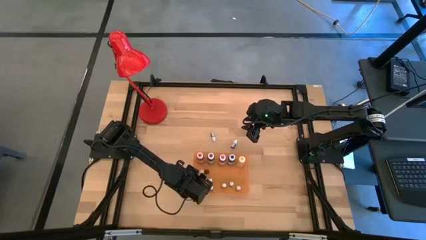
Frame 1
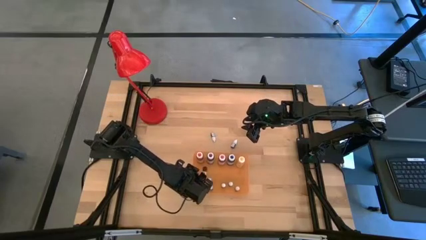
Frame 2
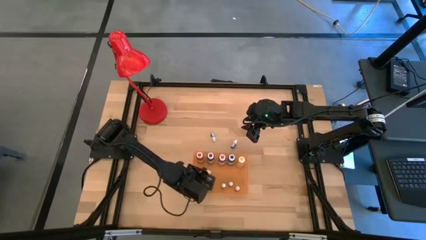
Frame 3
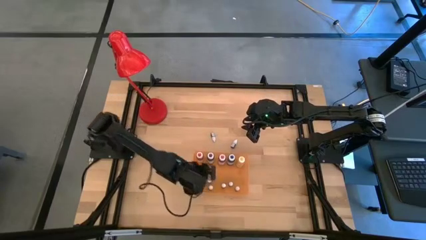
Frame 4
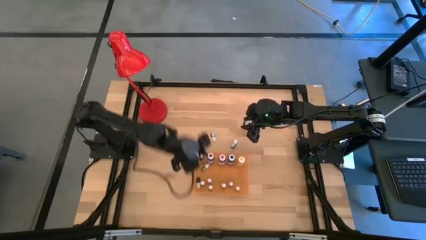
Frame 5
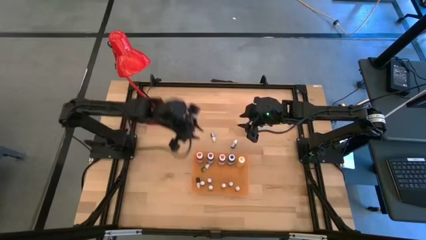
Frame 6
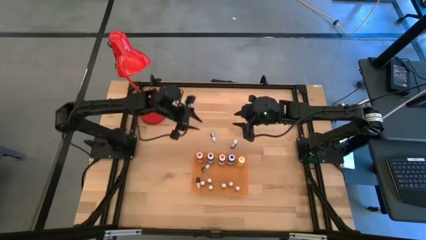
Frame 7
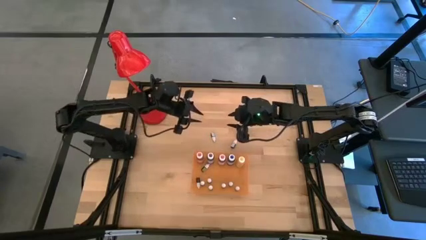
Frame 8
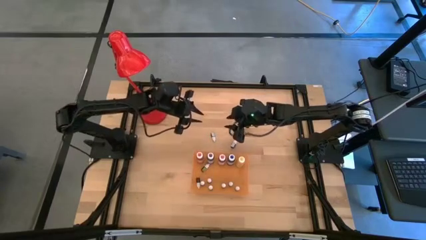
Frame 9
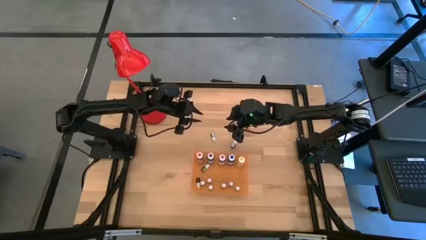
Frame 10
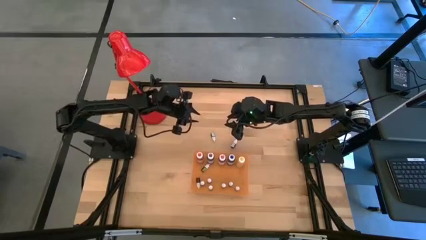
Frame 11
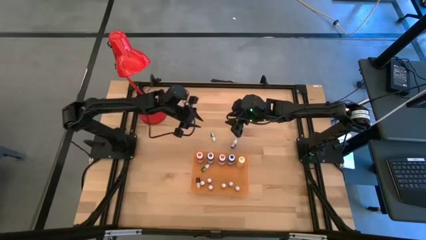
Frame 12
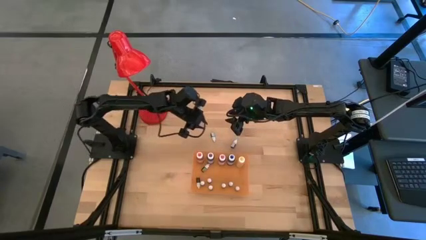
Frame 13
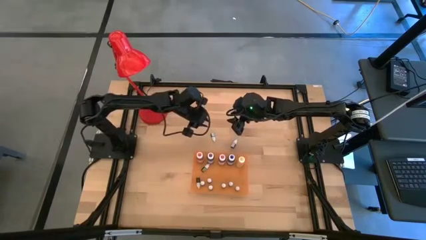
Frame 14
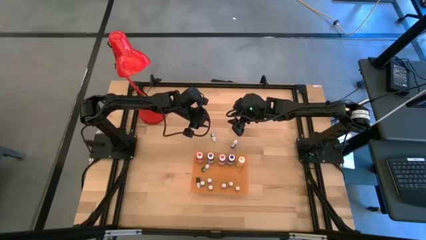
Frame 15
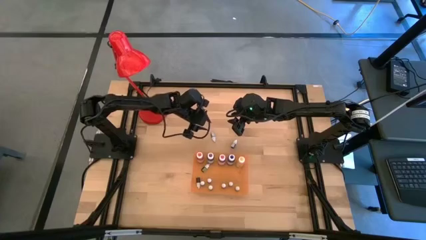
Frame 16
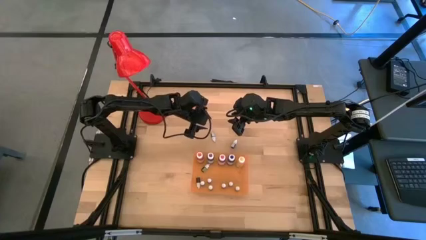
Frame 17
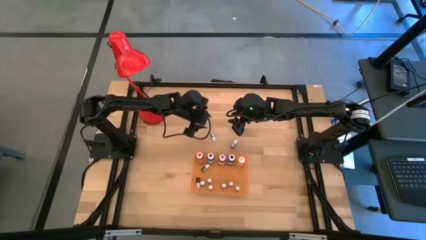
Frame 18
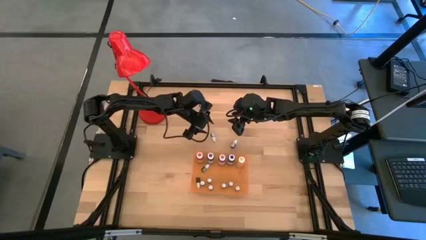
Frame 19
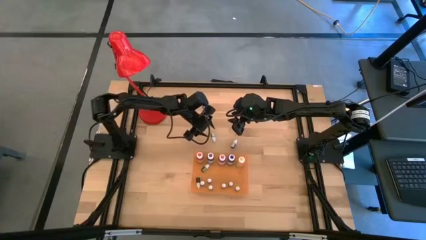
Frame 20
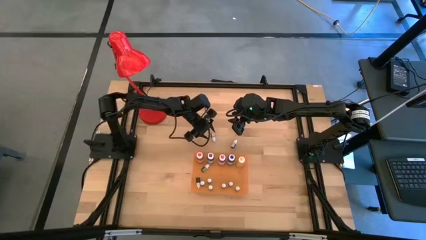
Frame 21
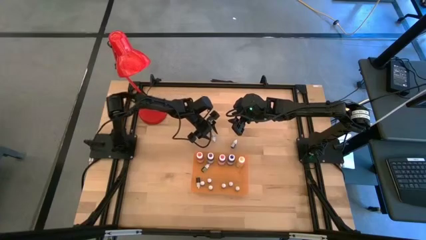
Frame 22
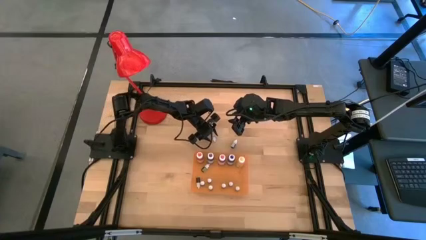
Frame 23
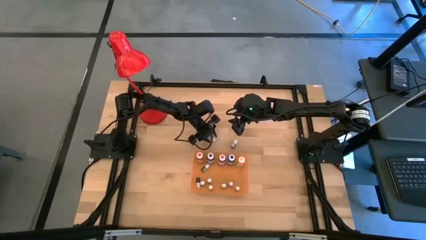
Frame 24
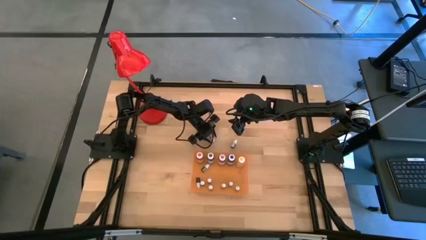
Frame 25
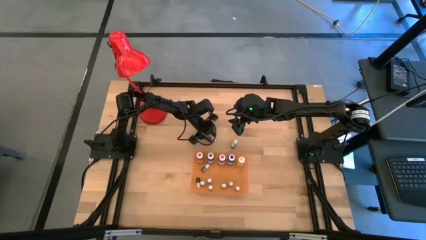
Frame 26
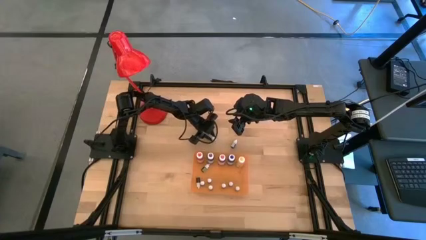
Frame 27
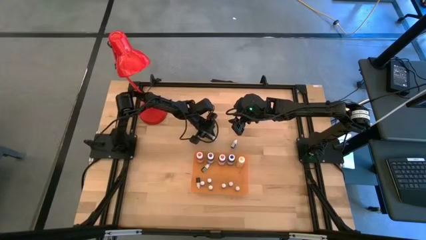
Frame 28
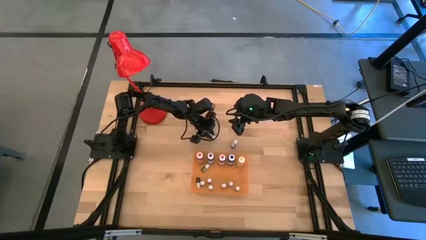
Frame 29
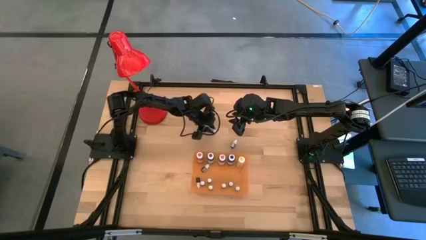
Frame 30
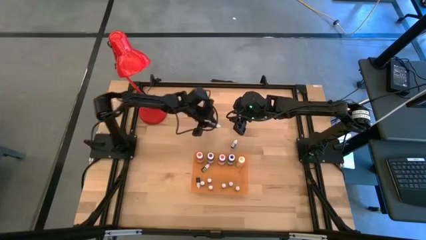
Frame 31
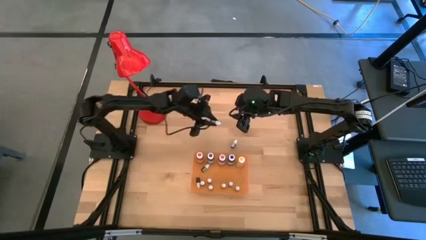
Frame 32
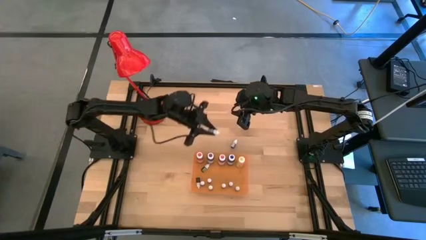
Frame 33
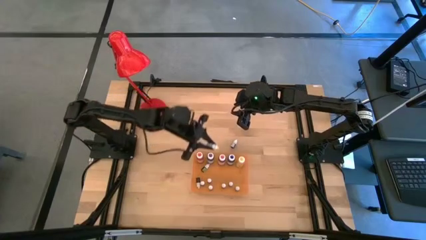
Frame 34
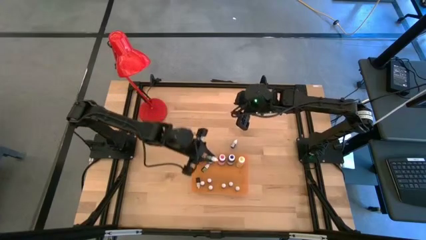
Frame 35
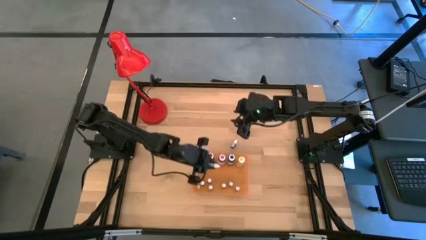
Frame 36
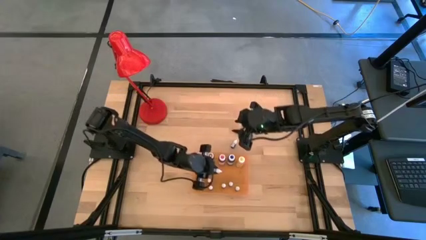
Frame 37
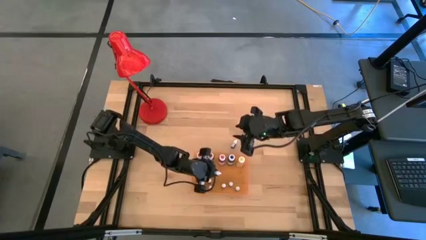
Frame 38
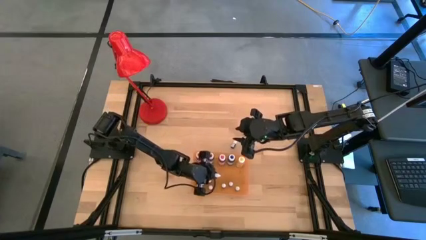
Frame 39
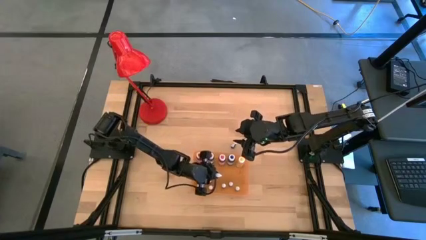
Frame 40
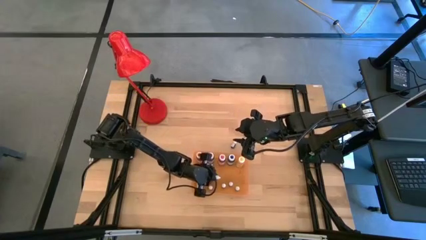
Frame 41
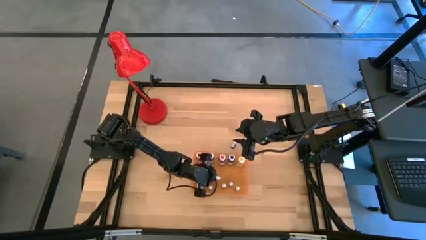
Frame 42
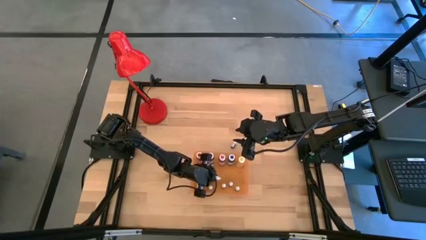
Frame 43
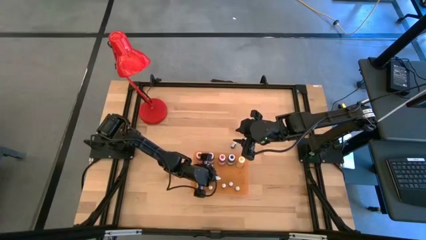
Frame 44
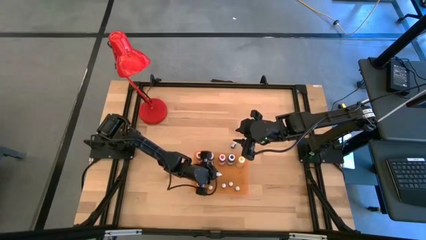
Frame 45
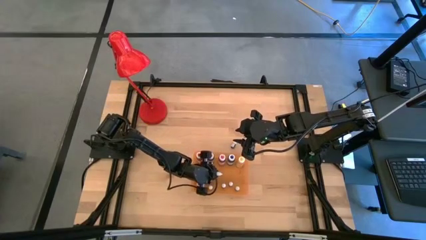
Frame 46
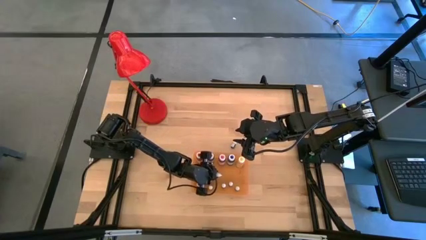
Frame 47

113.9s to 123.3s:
Task: Pick & Place food coloring
Put the small blue food coloring bottle into the orange bin

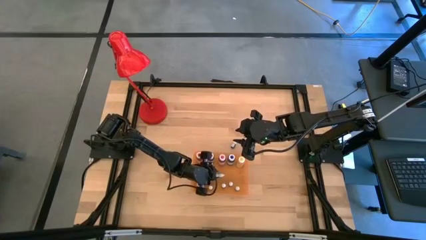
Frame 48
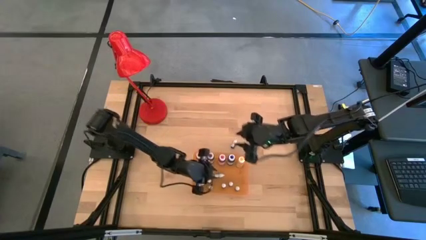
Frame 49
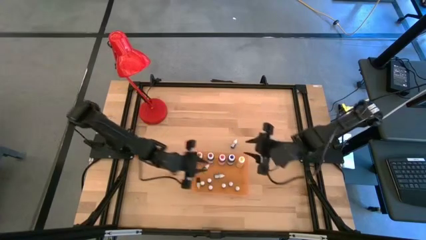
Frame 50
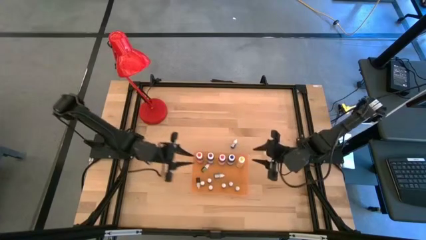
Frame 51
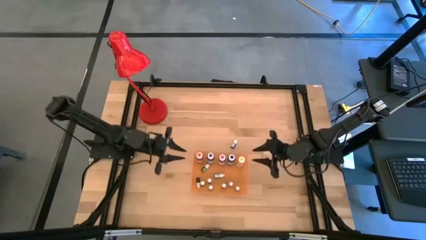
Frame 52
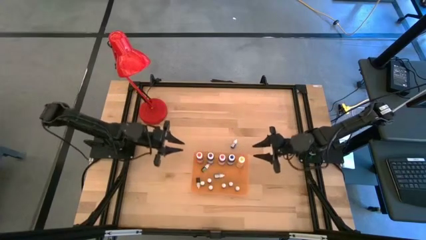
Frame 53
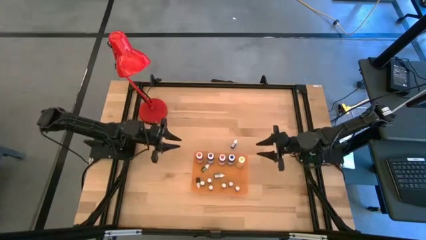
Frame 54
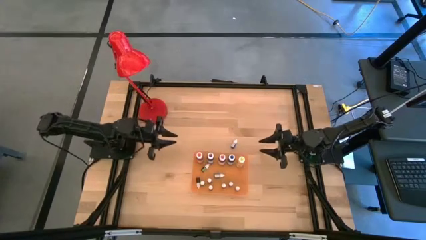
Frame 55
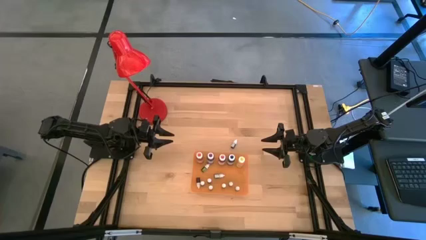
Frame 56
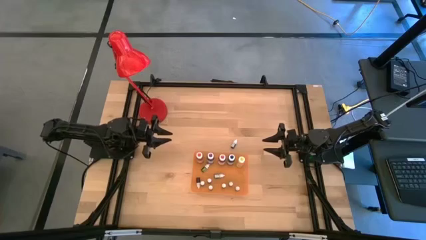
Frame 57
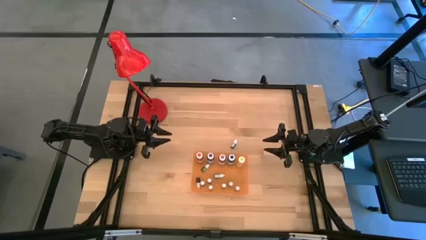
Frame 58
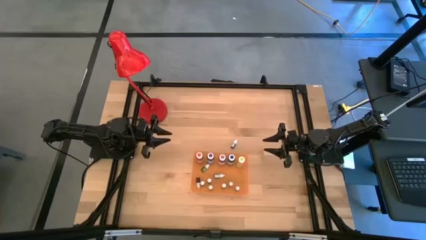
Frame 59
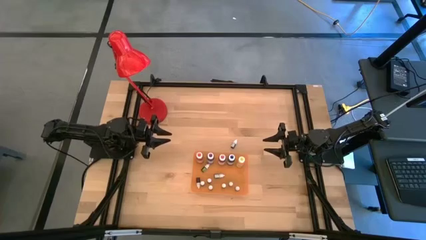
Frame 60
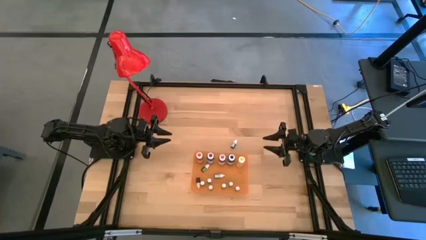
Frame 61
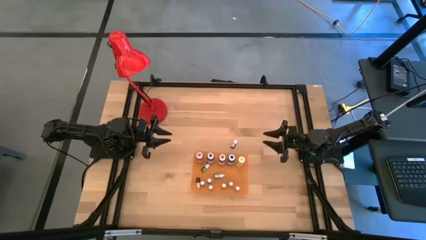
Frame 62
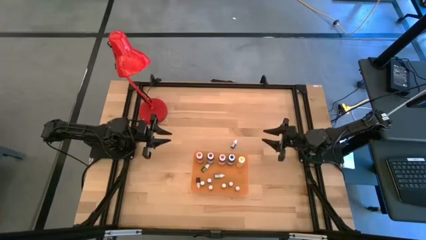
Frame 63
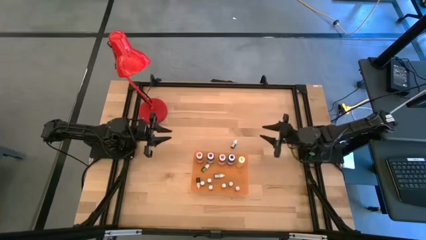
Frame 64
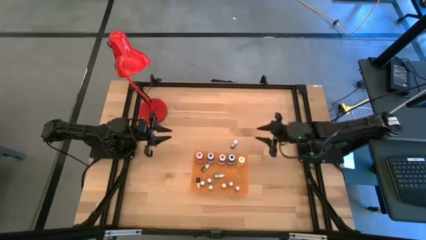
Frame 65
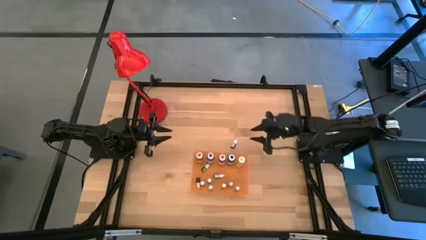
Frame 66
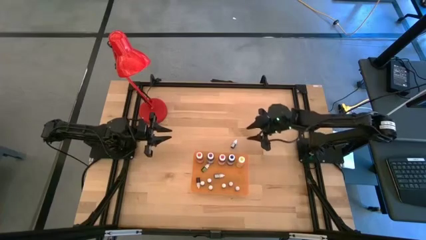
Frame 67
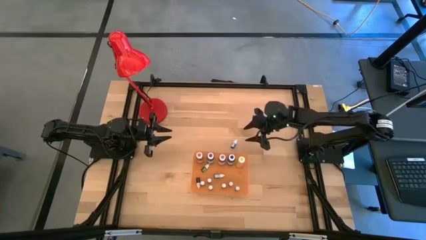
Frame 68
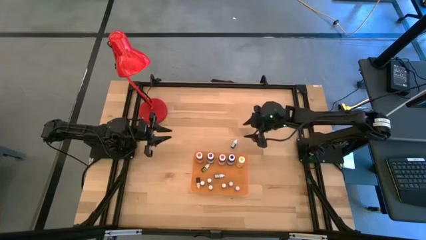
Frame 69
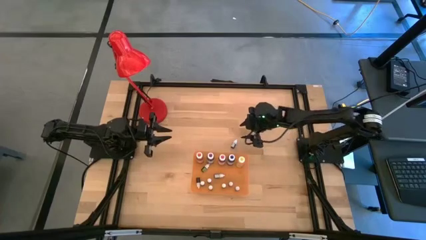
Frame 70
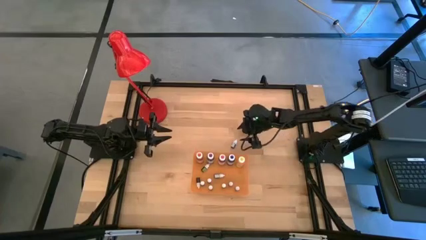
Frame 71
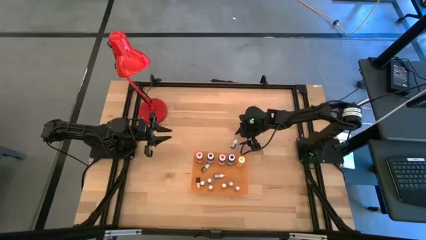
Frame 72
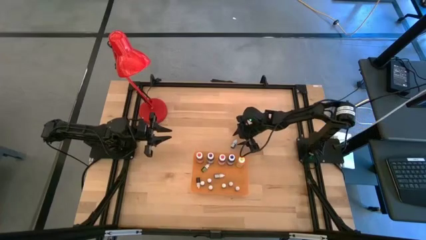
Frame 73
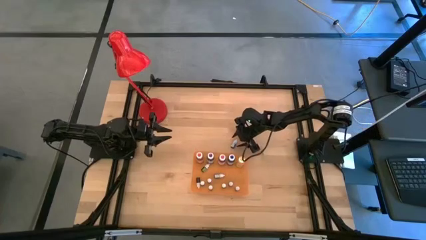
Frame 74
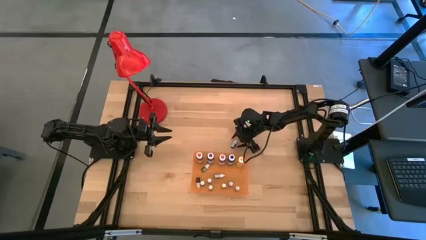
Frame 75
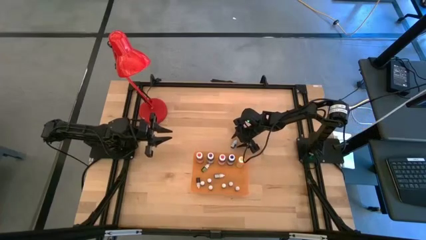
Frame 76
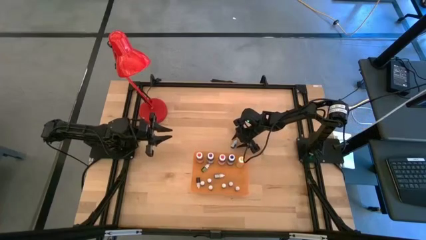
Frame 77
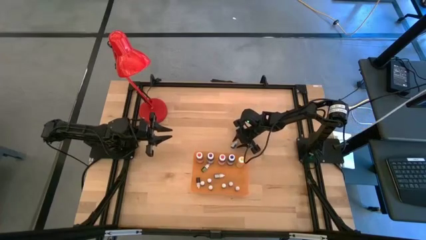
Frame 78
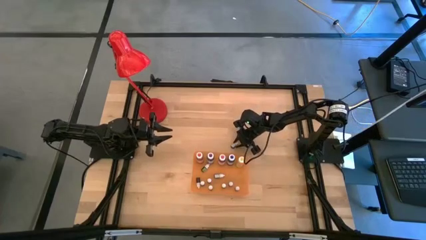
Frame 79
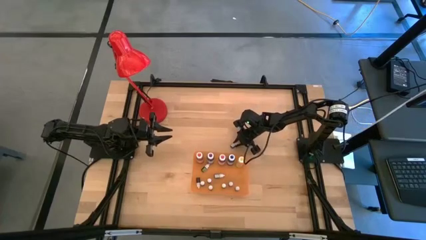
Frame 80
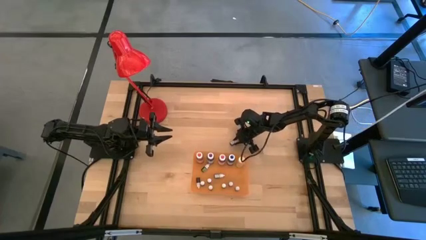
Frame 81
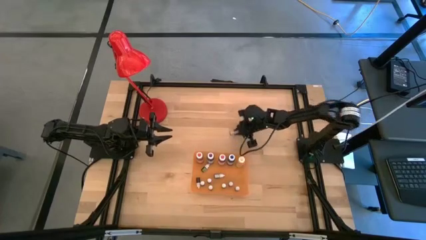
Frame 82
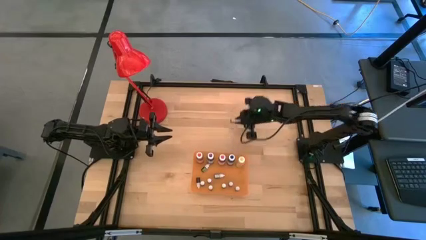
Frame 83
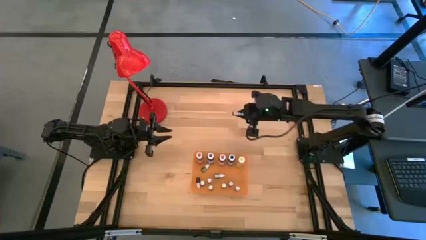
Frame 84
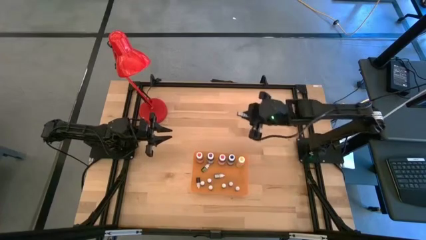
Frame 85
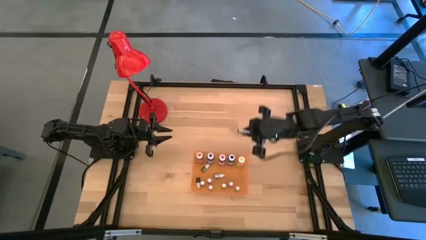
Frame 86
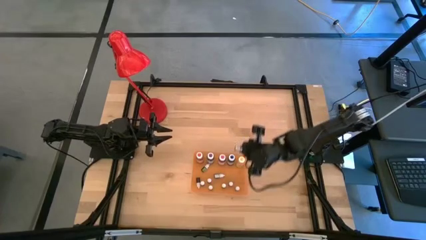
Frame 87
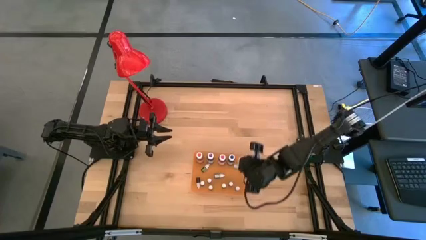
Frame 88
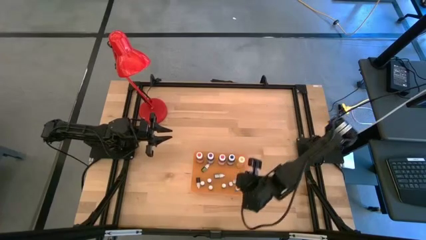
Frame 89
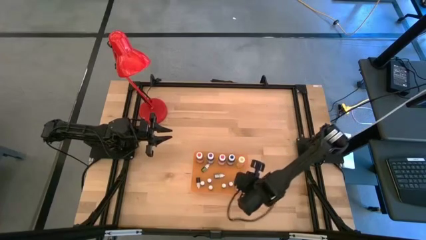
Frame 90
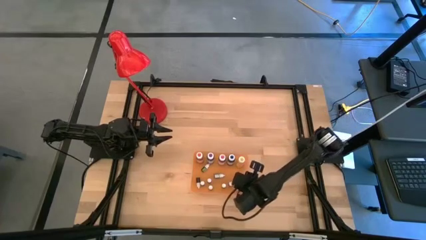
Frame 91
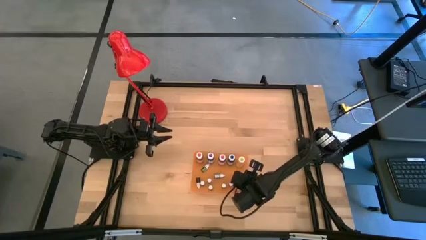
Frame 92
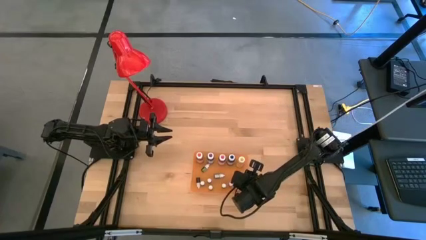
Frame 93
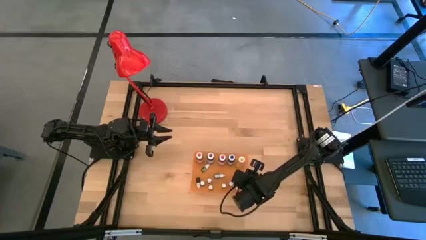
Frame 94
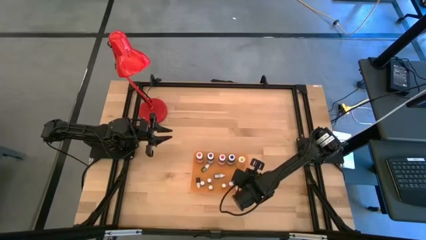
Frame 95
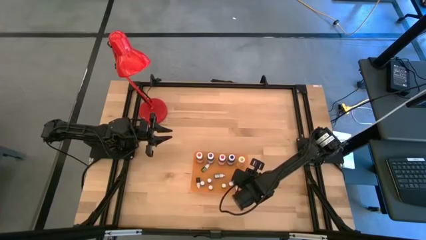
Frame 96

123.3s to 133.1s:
Put the small pink food coloring bottle into the orange bin
